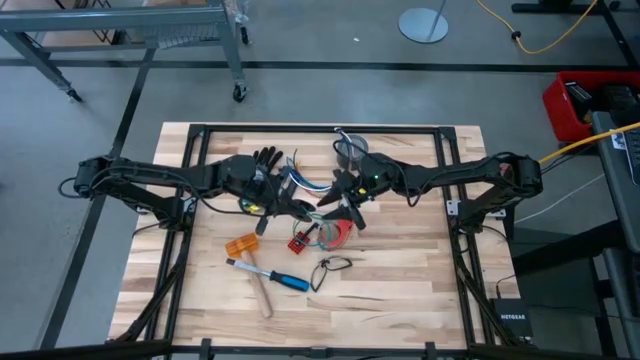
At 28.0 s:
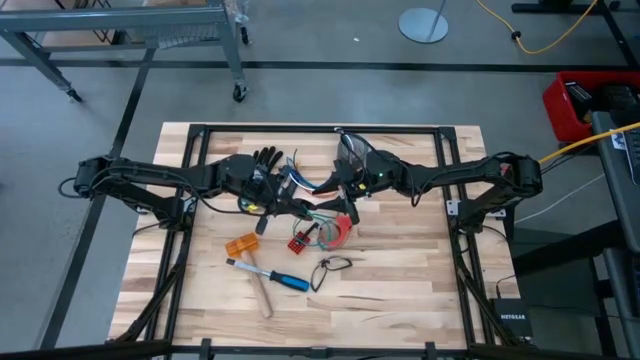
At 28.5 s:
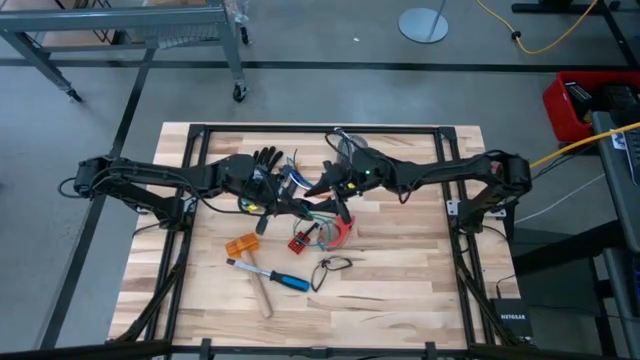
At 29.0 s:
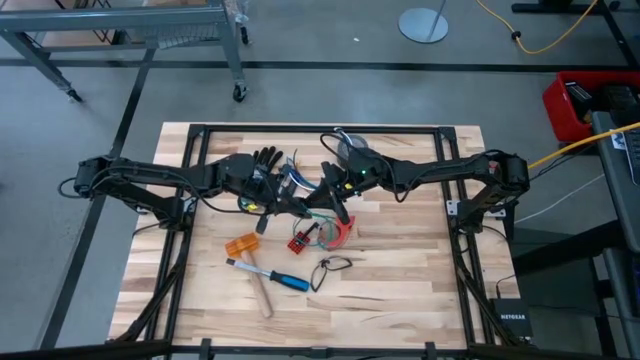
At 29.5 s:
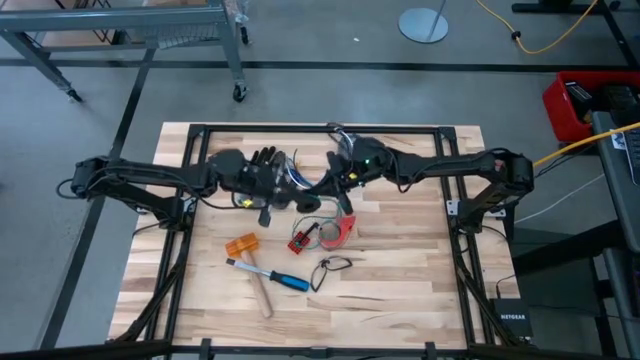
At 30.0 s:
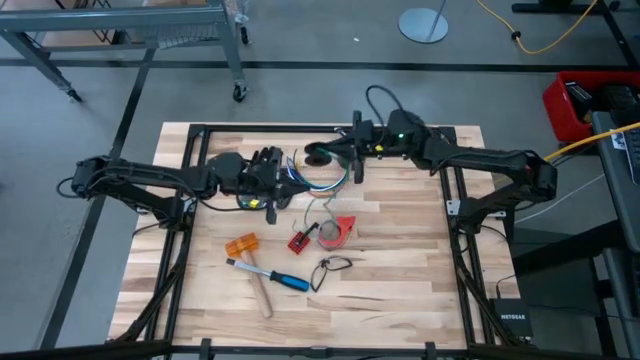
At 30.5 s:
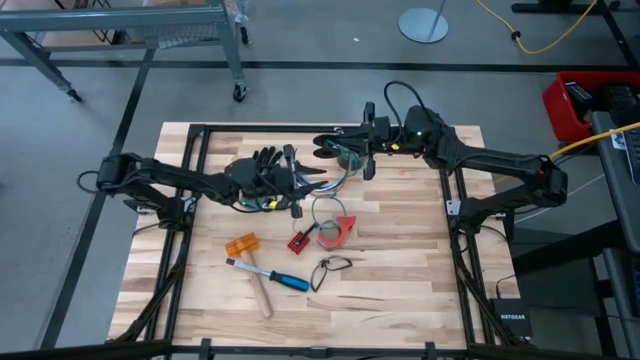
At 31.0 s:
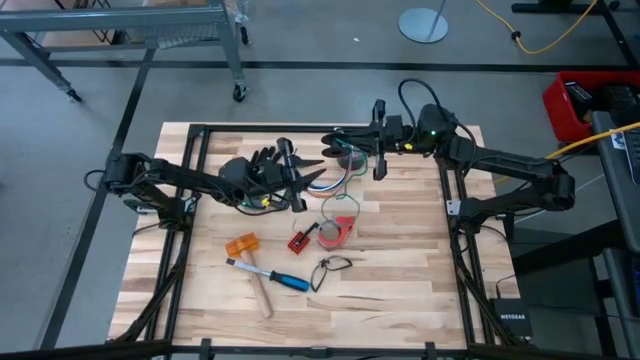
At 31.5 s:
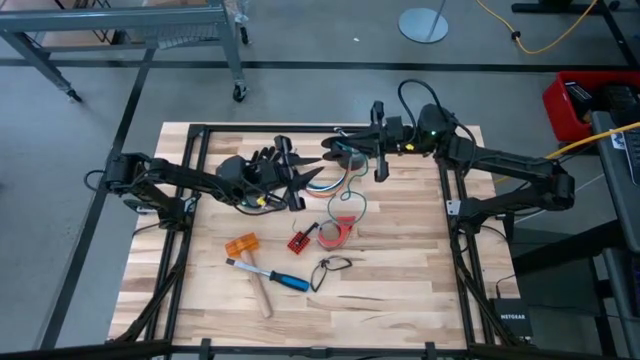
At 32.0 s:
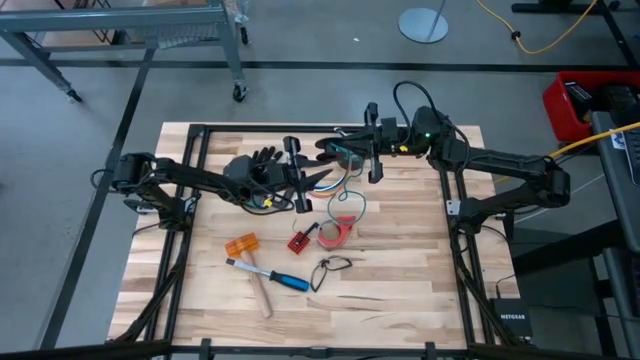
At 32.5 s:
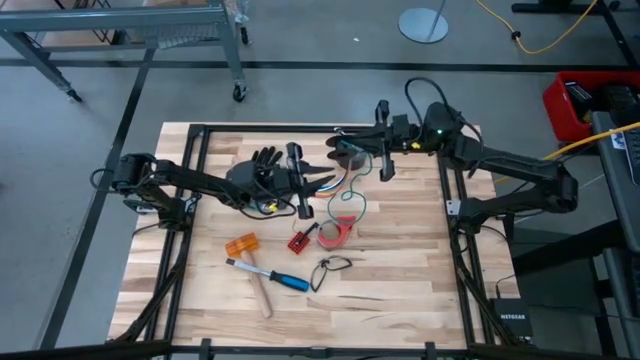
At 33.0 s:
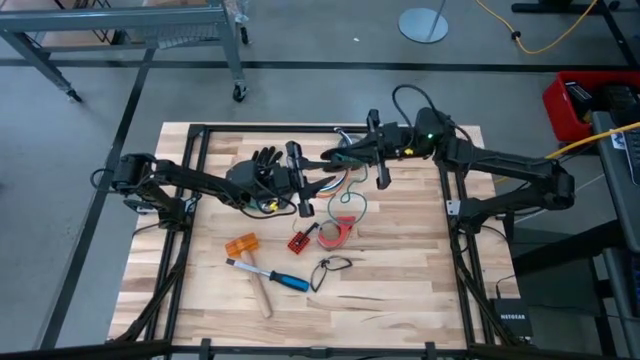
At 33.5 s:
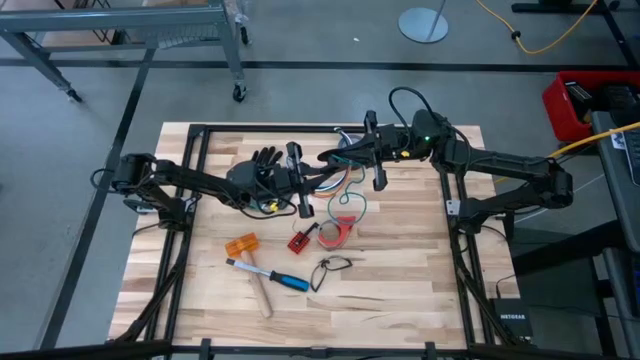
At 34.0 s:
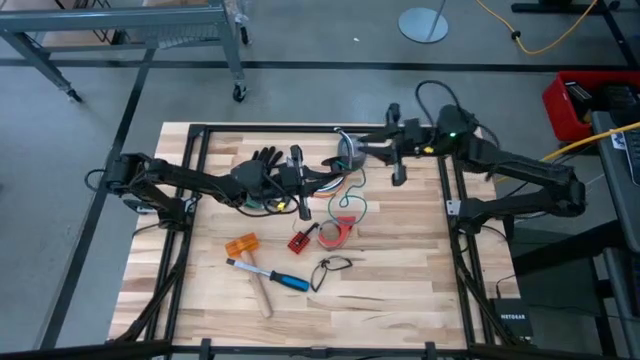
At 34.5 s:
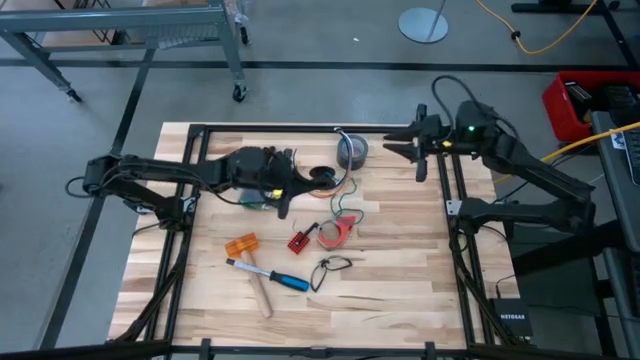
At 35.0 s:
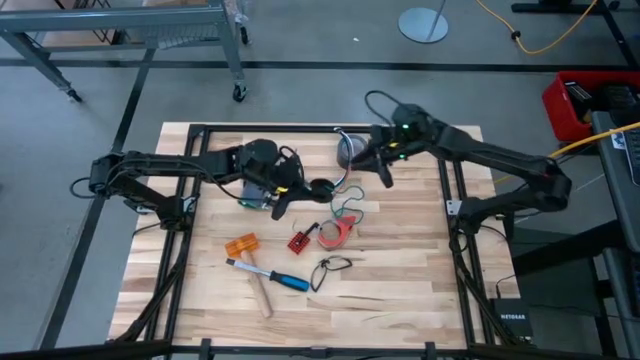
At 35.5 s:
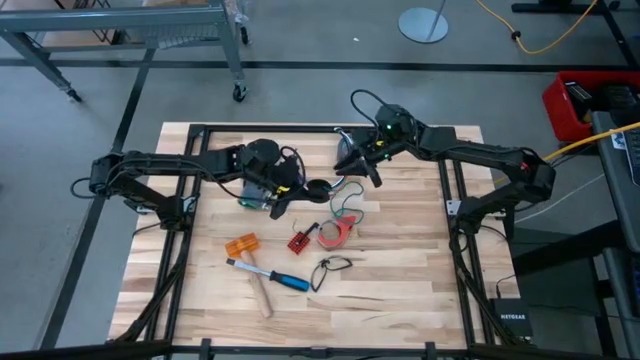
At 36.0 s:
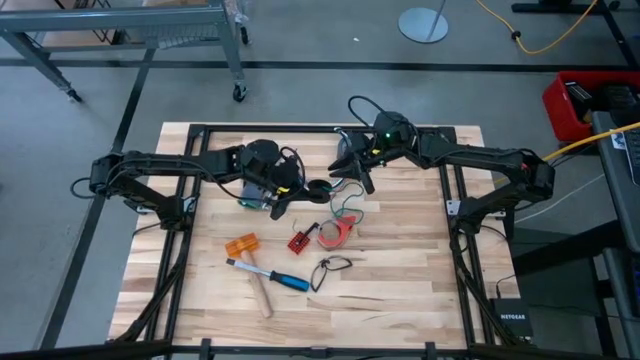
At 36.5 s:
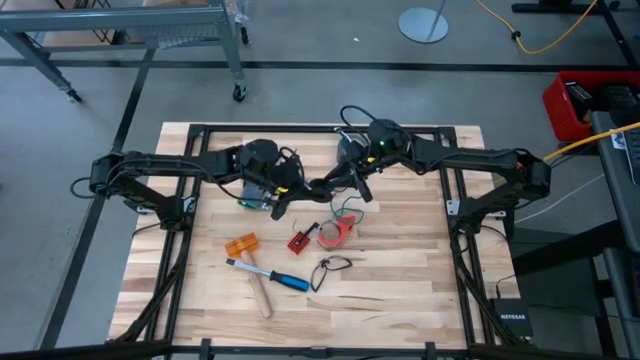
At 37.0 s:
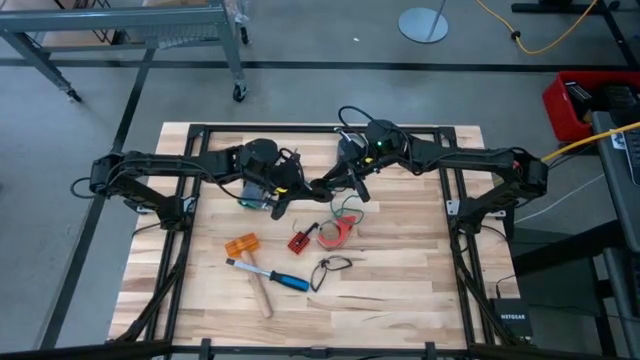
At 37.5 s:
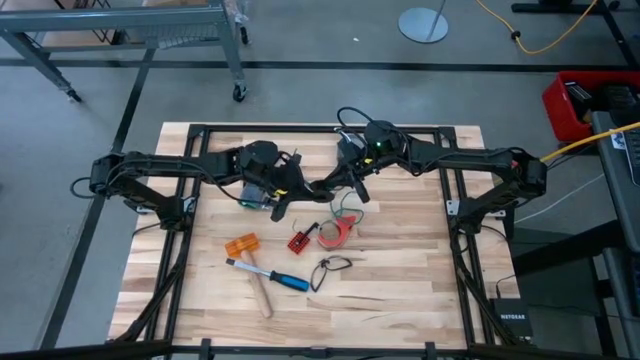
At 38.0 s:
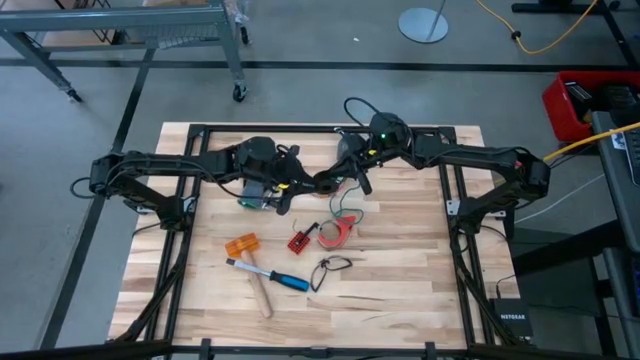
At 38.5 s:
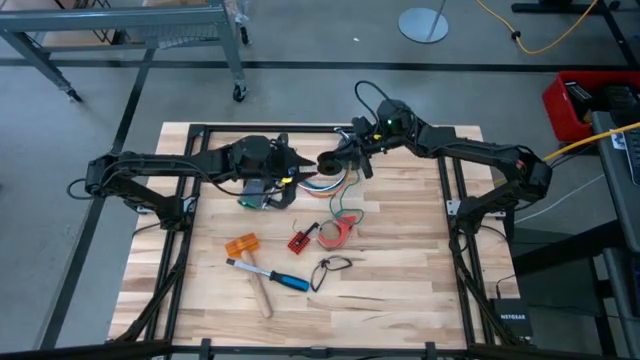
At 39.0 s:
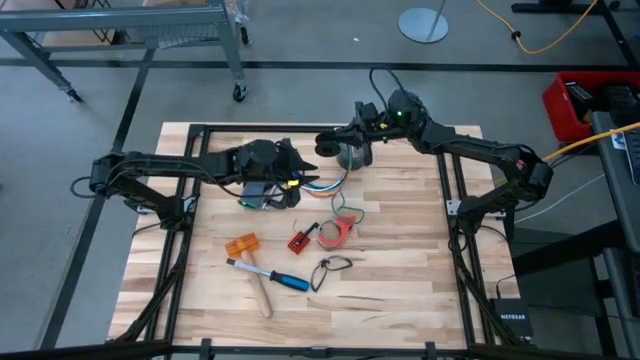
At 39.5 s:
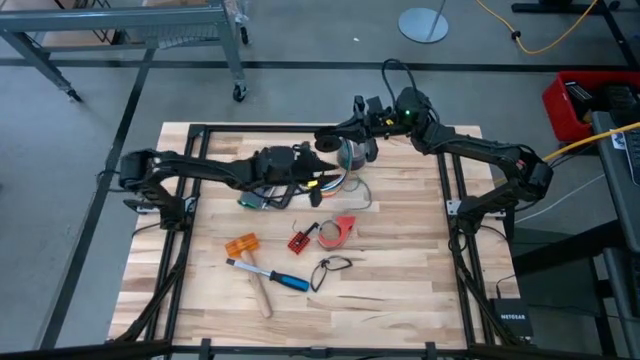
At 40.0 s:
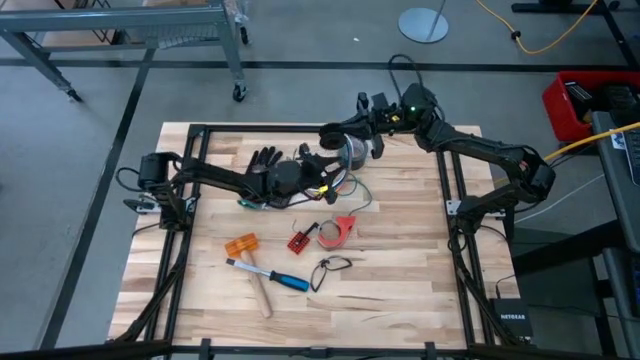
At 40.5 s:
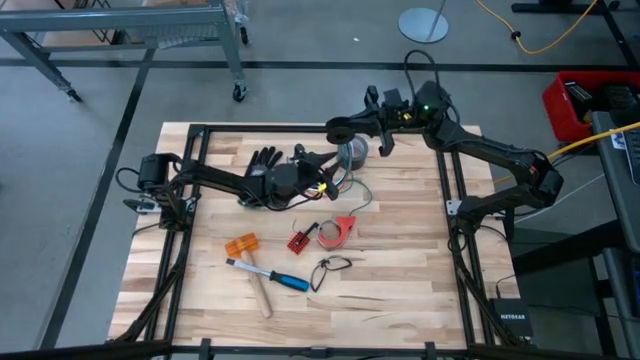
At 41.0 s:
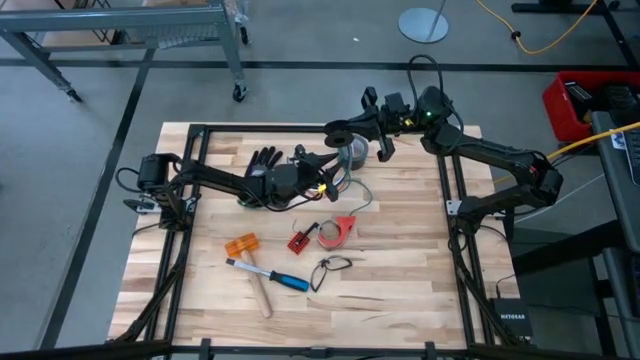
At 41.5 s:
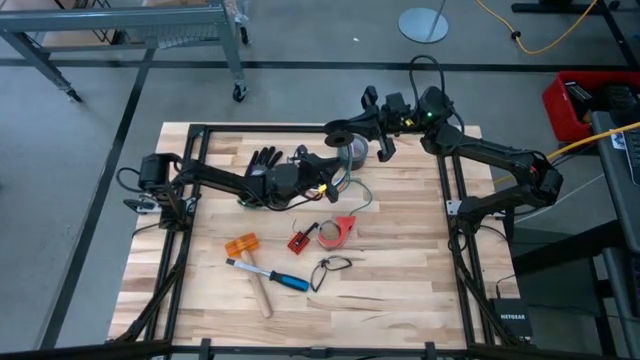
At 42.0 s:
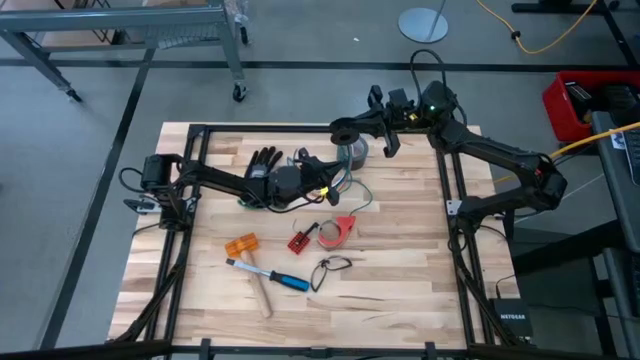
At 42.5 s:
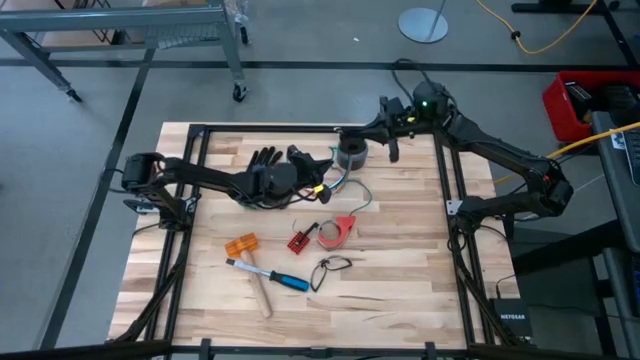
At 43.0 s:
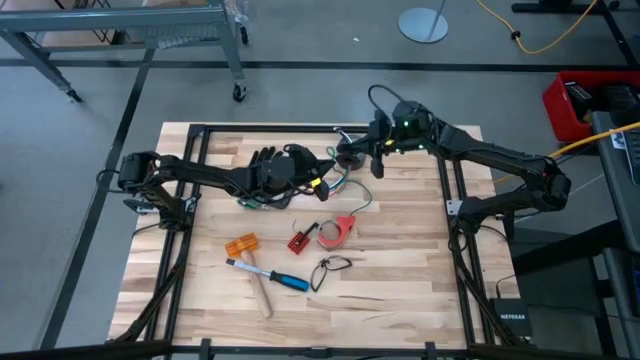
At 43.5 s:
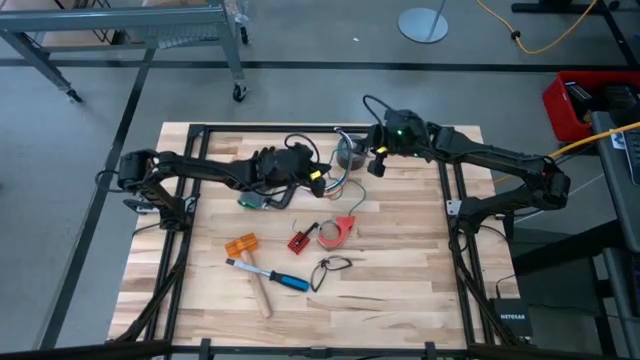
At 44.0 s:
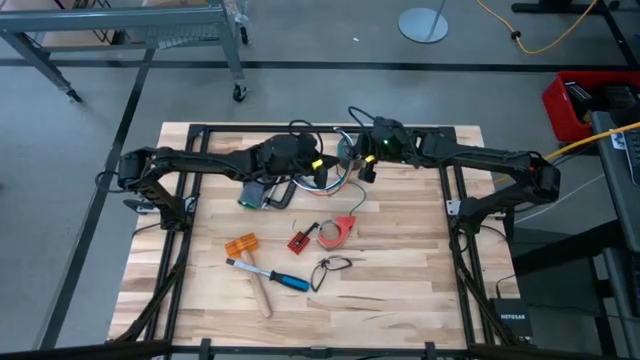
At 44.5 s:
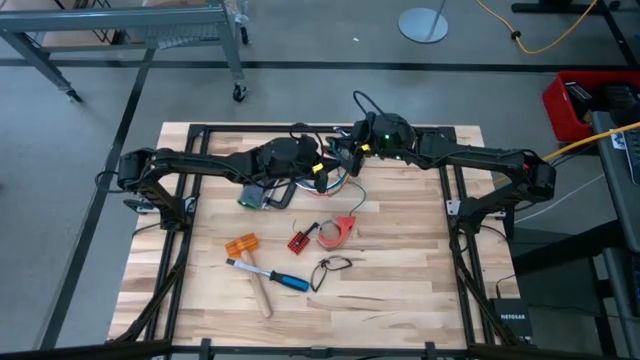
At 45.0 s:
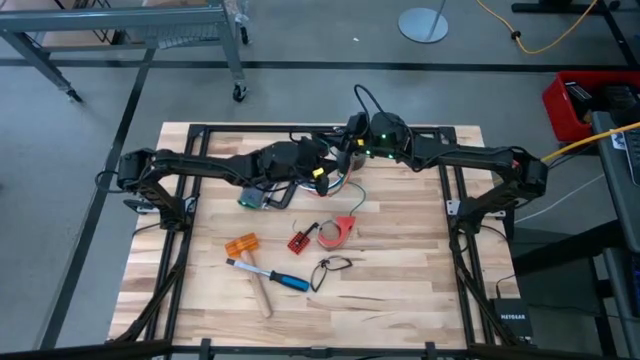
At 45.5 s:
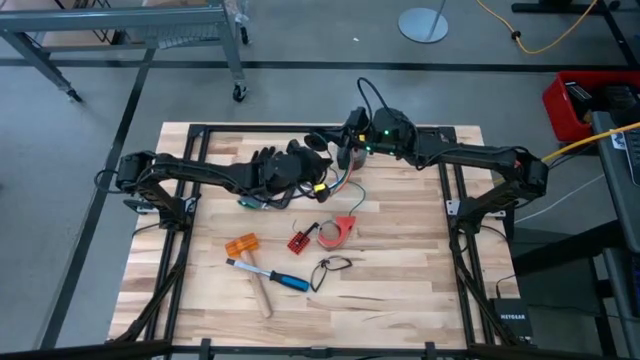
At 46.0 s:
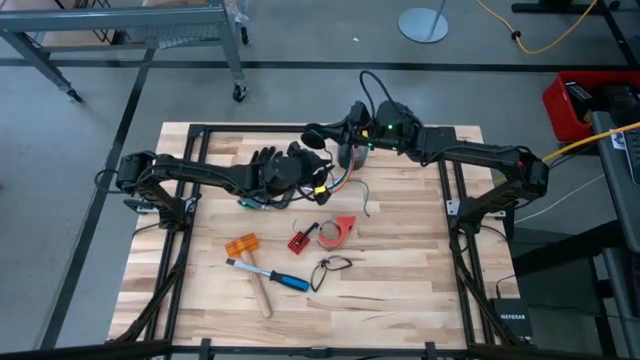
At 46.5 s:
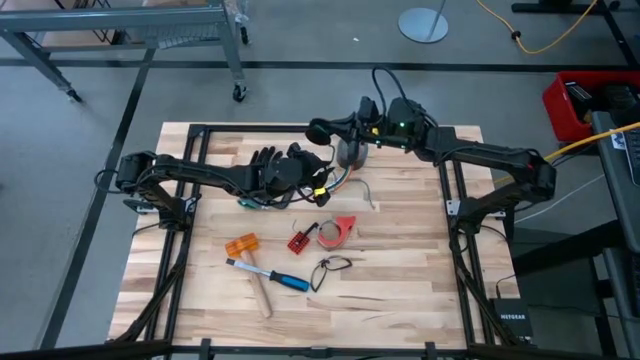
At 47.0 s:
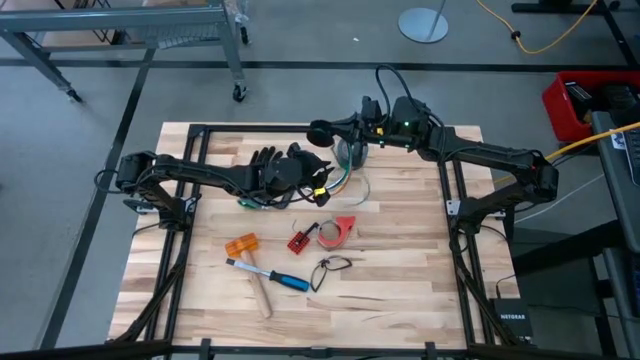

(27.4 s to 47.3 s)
Task: Coil cords
Coil the wire onto the spool
